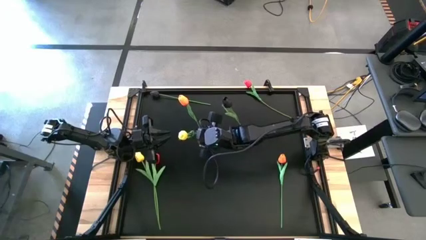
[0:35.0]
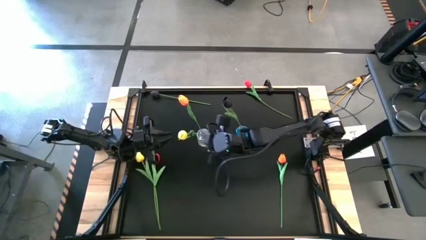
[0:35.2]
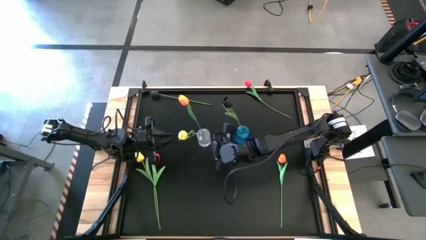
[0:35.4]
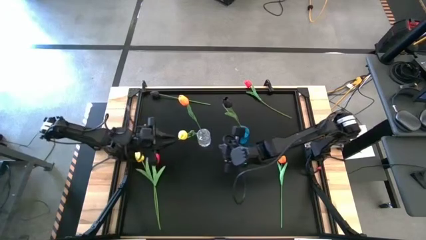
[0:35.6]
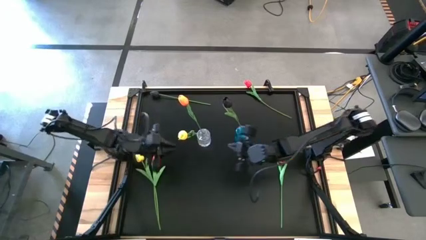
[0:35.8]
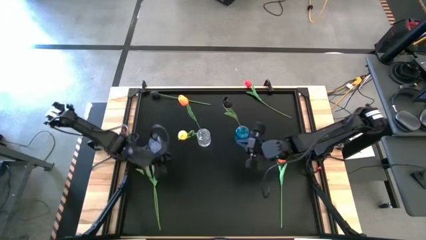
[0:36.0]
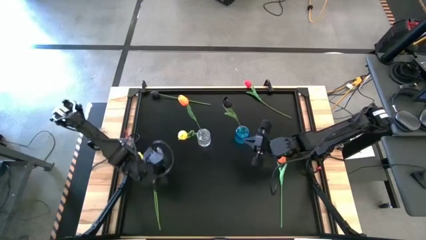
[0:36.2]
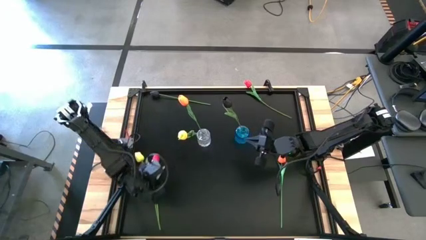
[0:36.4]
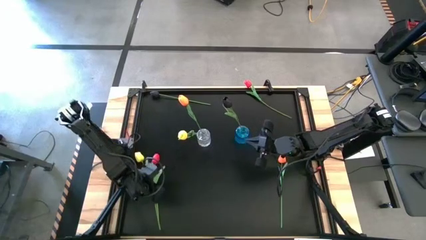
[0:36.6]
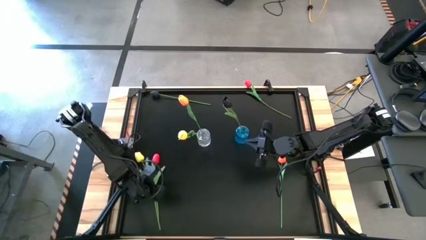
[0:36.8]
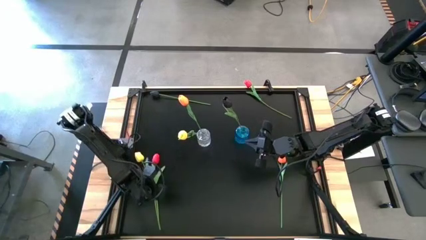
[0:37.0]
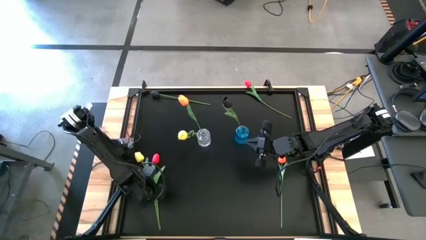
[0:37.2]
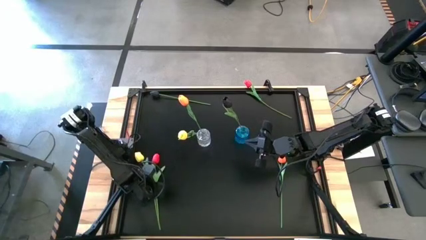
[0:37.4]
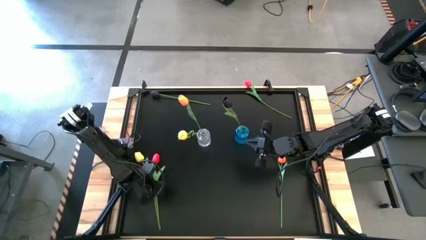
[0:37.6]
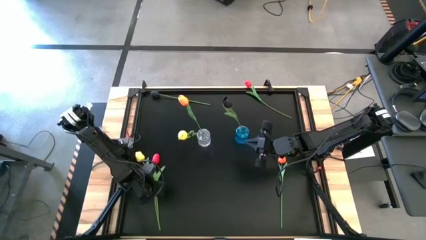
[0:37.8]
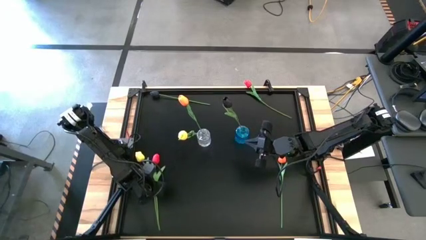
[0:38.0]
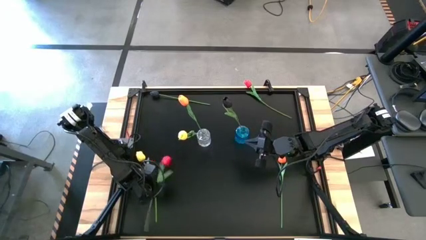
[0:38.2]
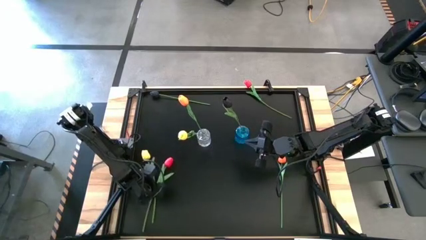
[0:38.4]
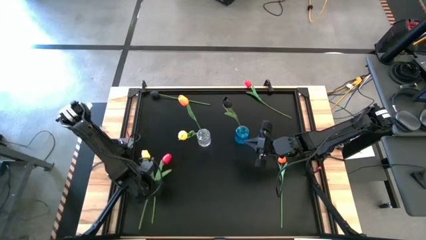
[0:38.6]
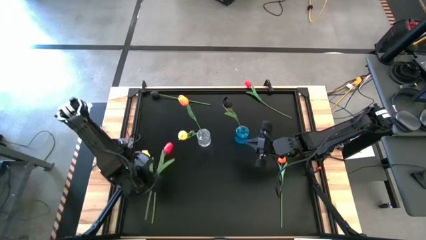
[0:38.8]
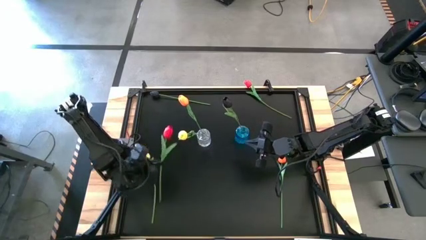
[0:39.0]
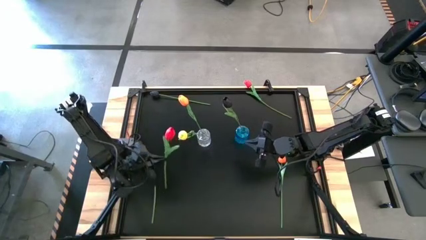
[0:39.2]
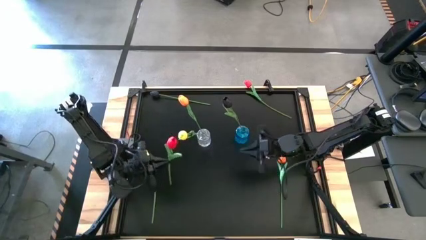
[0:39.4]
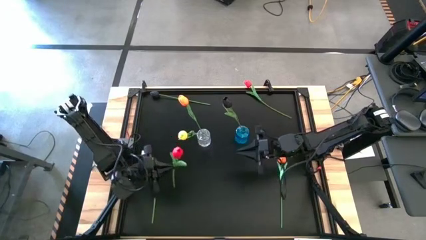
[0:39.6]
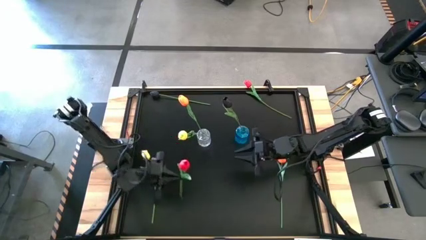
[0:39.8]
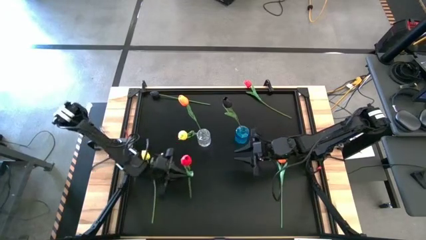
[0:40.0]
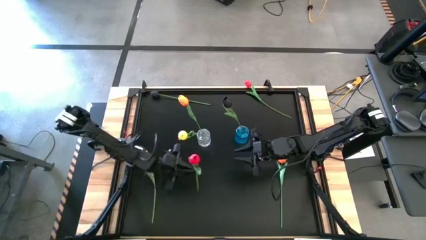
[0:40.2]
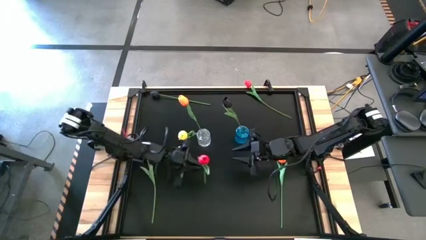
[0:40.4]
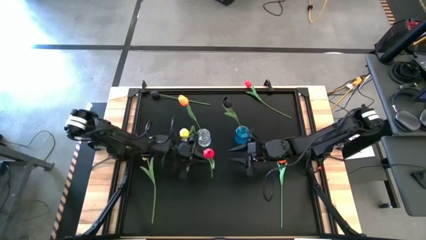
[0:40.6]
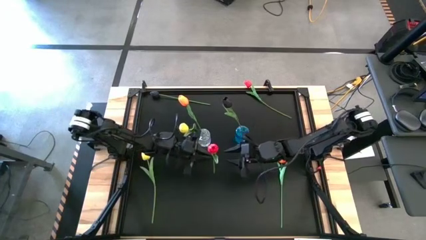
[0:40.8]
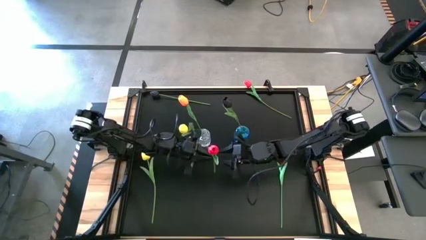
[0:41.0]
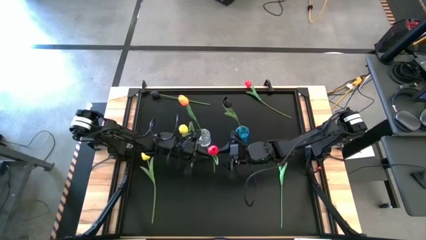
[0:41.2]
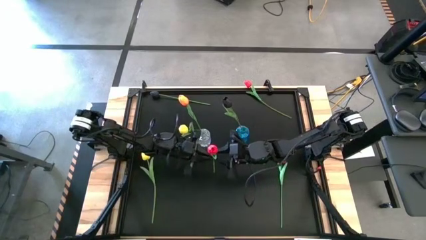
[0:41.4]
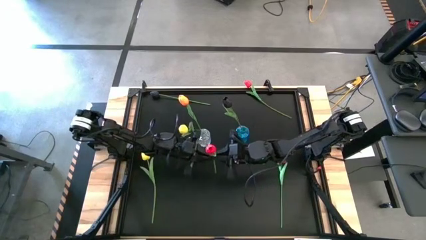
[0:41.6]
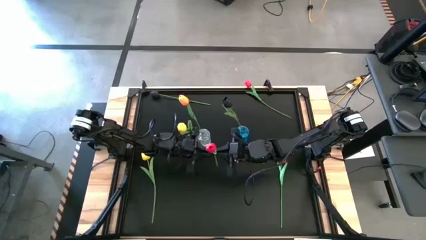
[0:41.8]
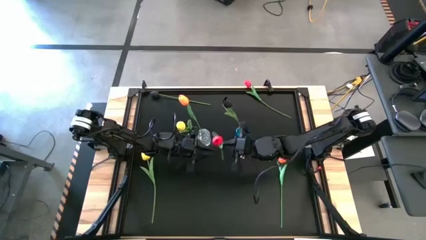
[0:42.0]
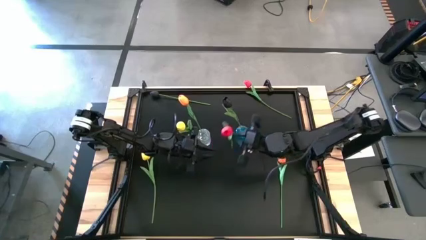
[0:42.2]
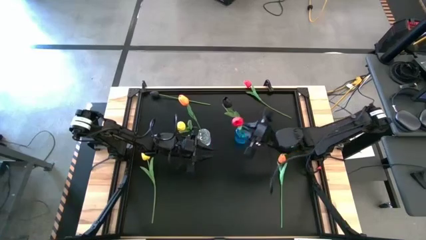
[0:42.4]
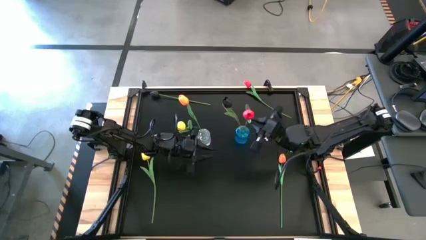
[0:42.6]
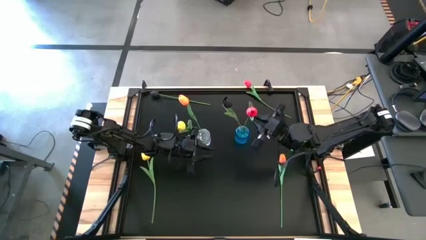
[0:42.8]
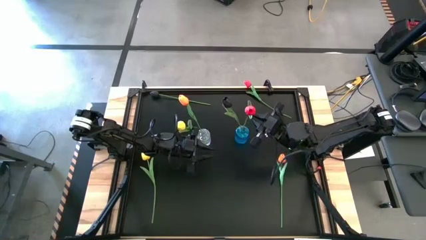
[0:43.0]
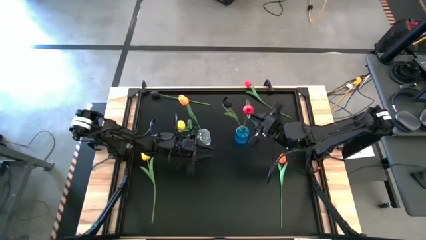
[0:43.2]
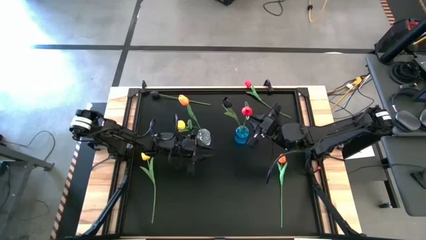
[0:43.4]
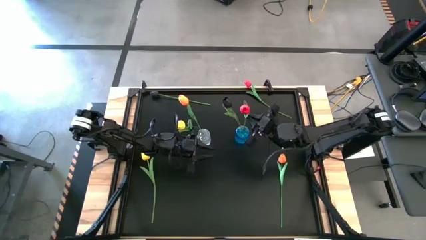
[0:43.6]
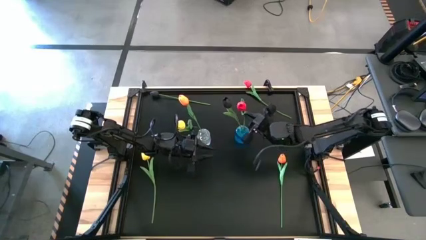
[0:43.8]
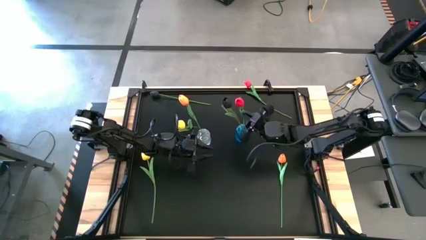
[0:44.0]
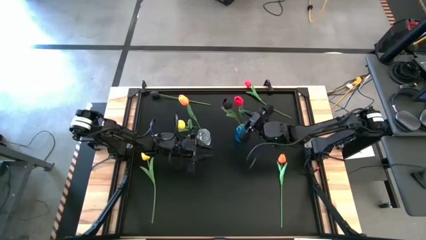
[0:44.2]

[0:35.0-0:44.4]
Task: Sort flowers into vase by color
Put the bottom red flower into the blue vase

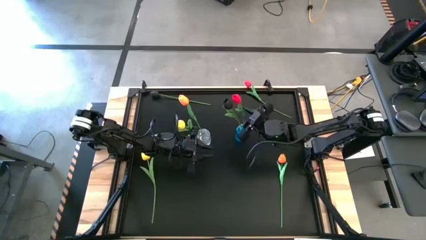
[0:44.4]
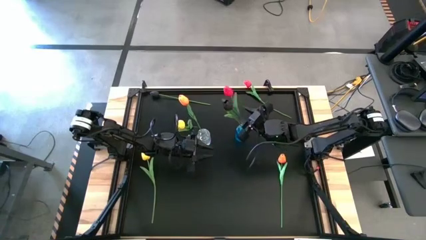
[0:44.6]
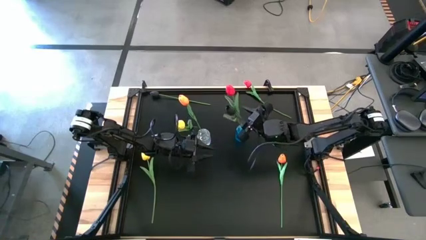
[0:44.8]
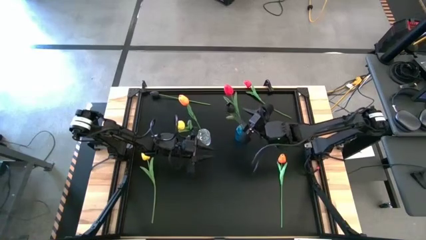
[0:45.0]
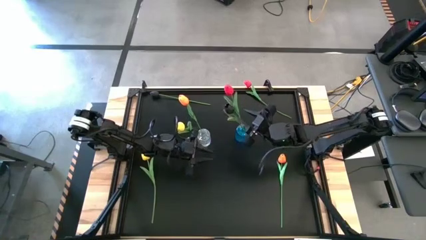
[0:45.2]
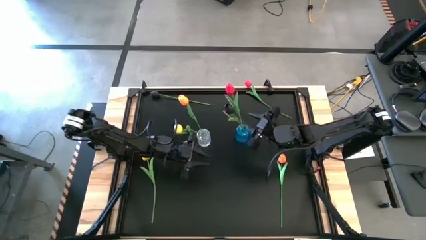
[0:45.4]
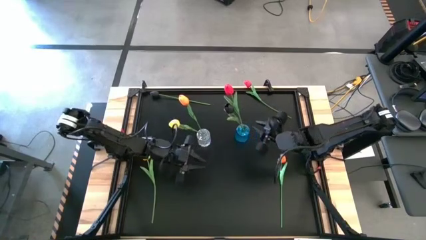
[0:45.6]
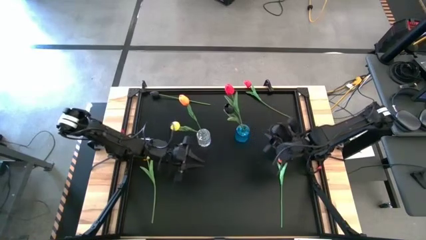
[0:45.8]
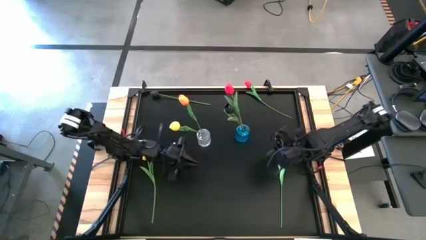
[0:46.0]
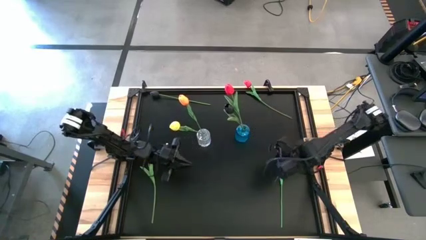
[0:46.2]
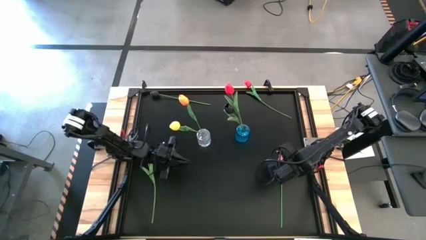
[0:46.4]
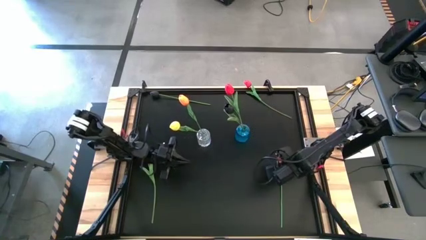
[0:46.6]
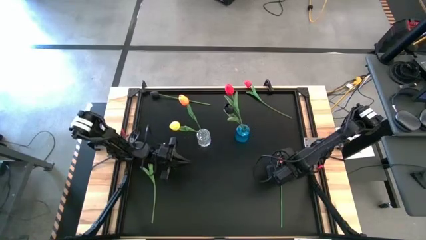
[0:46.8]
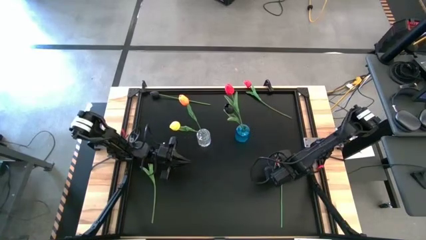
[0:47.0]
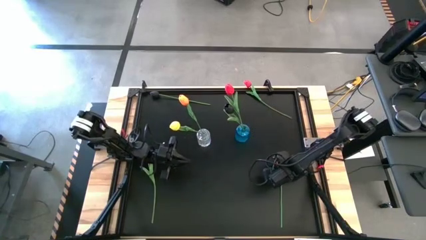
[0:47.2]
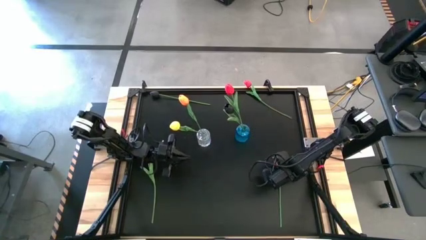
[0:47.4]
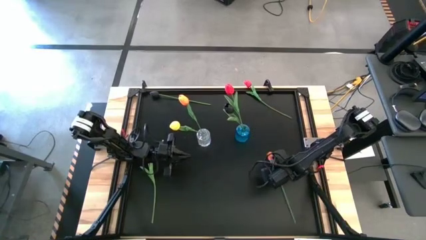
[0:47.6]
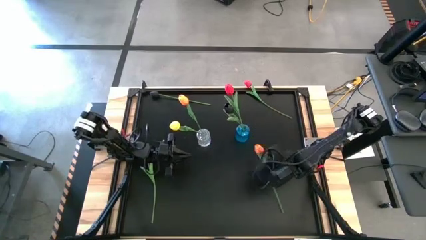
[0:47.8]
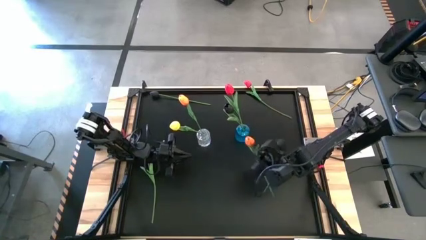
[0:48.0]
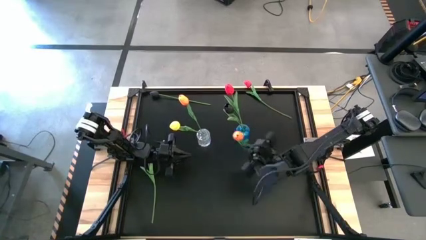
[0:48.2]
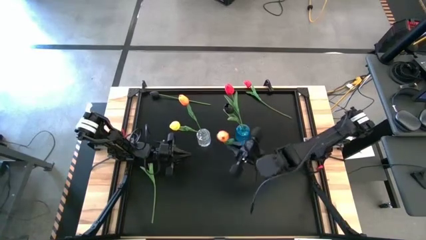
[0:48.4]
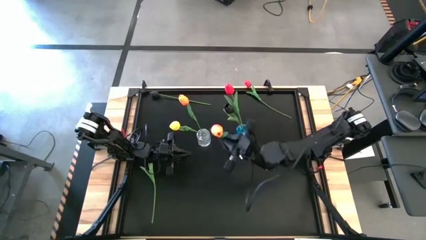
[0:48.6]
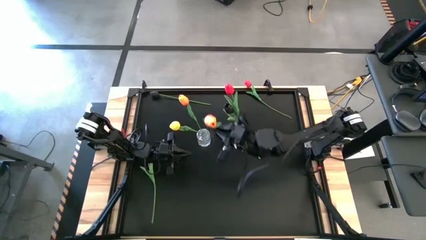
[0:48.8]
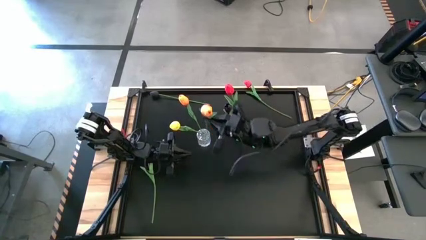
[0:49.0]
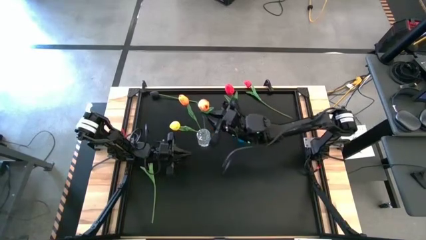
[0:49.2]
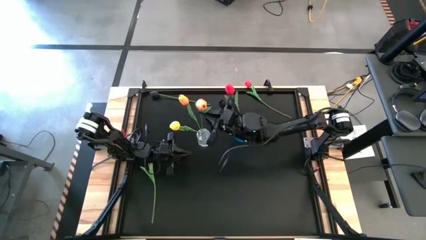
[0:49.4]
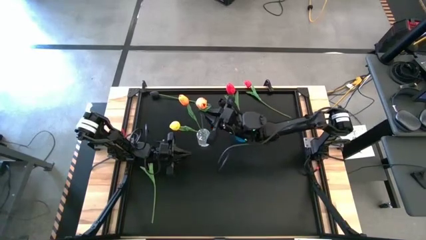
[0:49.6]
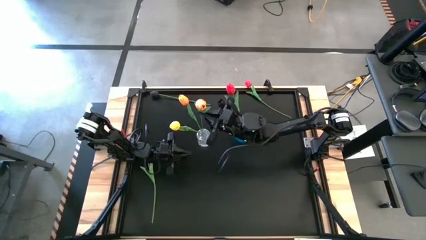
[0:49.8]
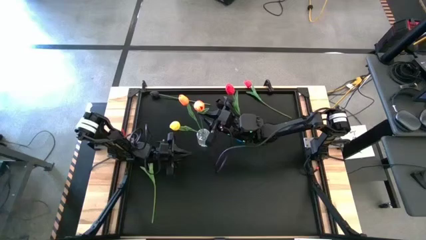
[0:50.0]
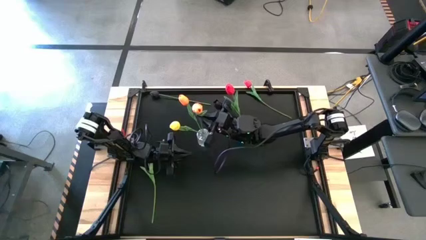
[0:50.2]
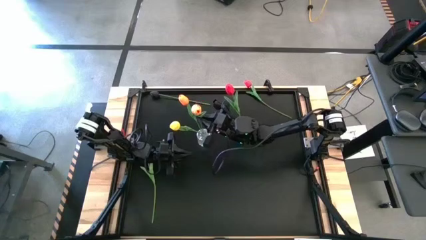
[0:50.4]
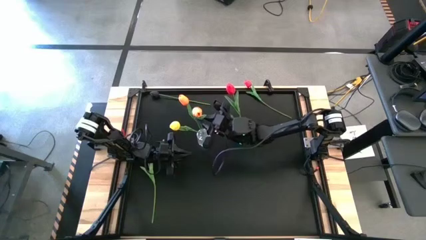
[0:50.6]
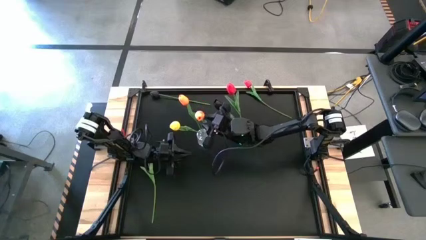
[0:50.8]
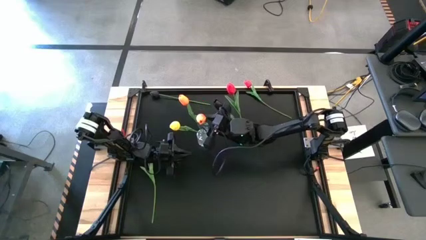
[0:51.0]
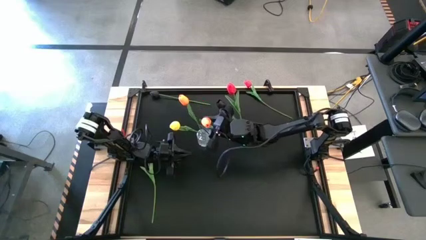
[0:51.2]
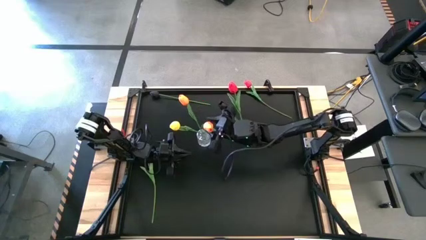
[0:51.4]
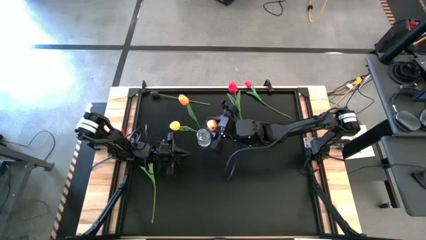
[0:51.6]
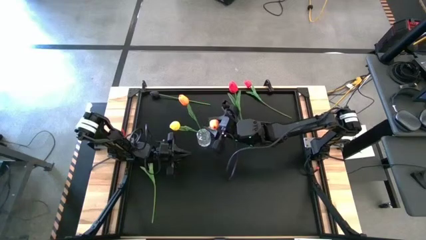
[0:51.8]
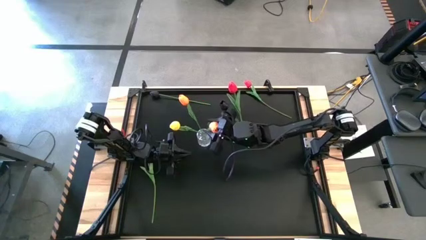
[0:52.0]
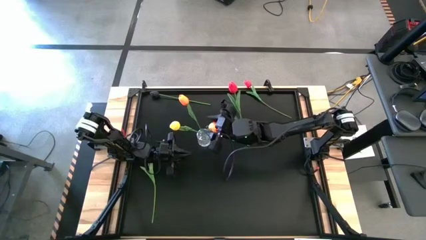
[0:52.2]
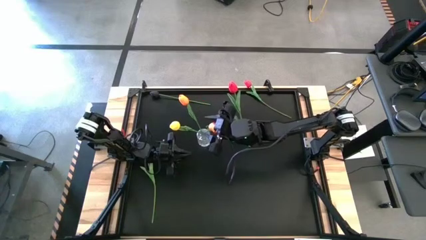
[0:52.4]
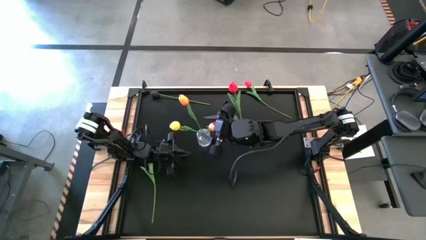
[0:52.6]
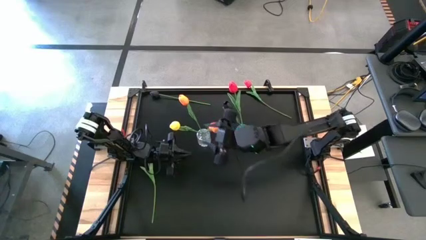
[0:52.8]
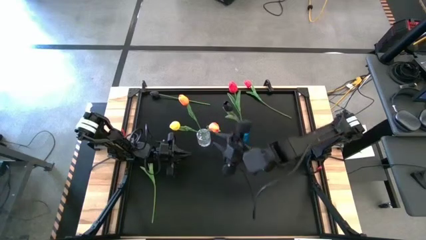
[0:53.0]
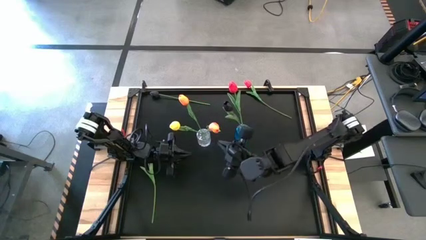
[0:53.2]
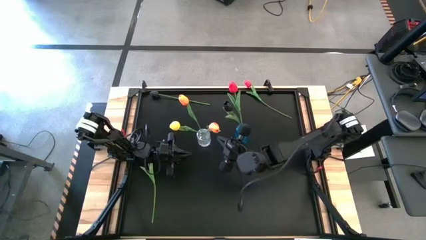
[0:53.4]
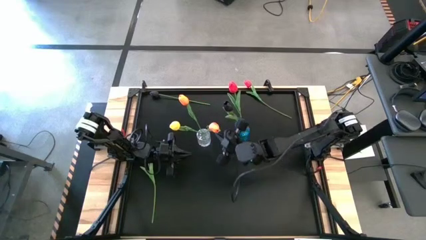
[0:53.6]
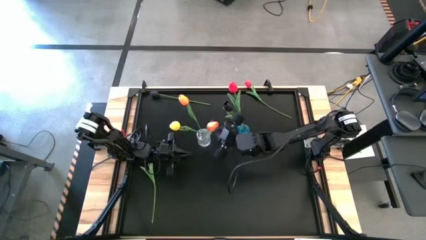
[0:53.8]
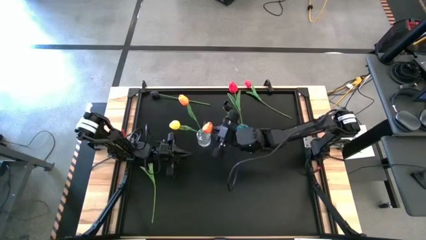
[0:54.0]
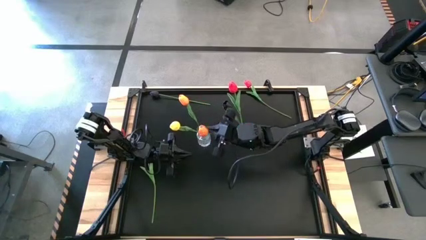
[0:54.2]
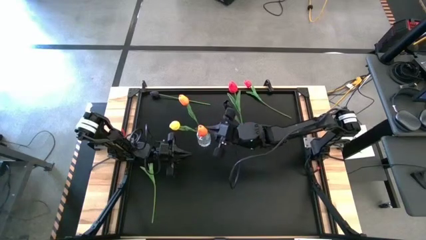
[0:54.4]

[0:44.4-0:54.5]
Put the orange flower into the transparent vase
